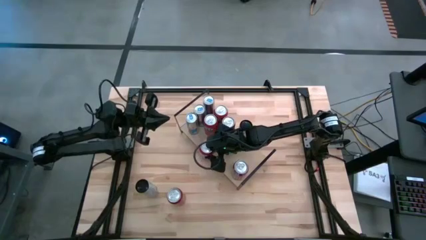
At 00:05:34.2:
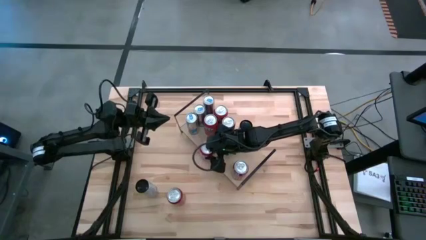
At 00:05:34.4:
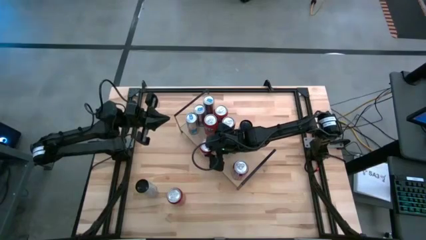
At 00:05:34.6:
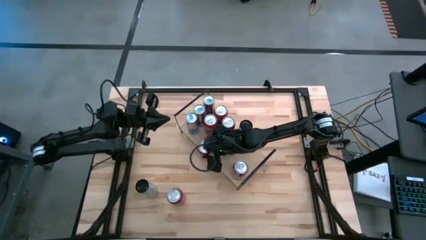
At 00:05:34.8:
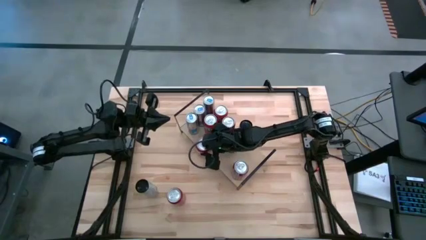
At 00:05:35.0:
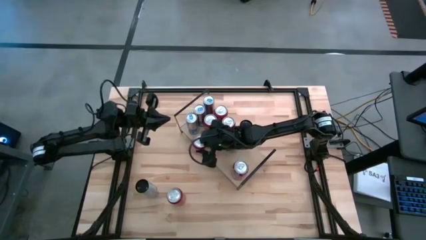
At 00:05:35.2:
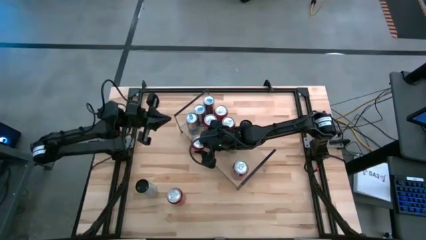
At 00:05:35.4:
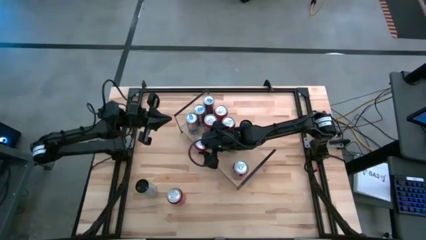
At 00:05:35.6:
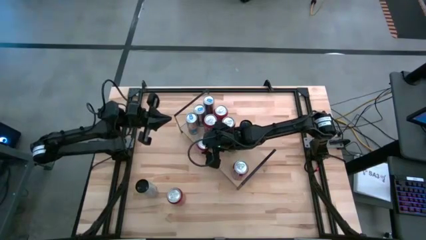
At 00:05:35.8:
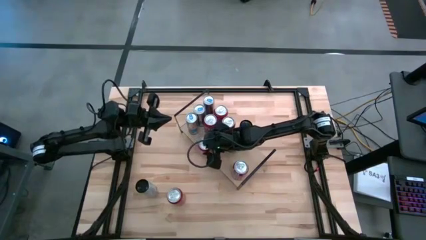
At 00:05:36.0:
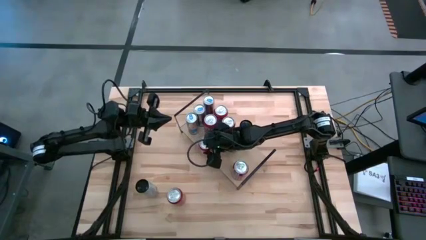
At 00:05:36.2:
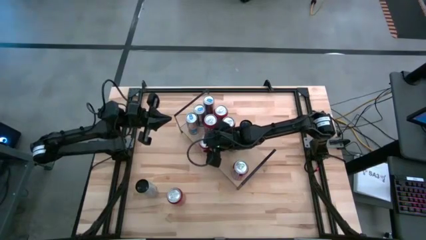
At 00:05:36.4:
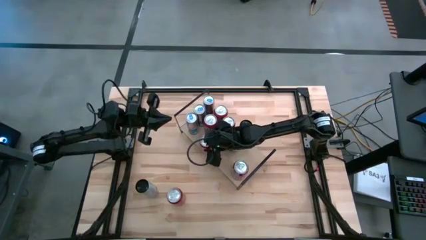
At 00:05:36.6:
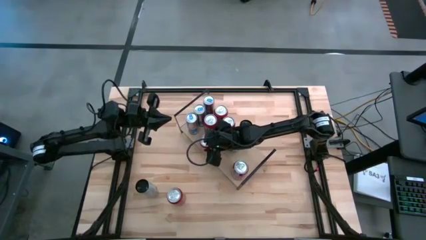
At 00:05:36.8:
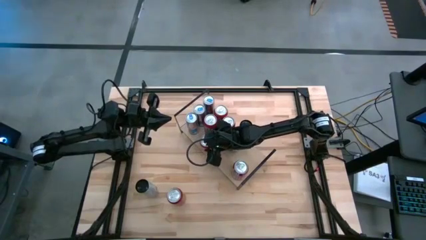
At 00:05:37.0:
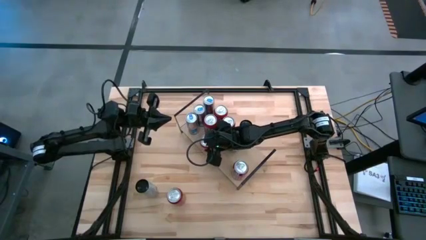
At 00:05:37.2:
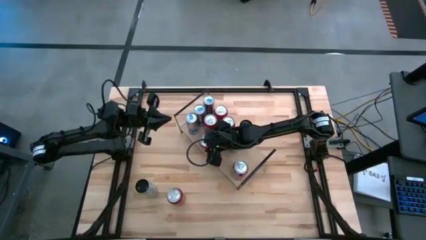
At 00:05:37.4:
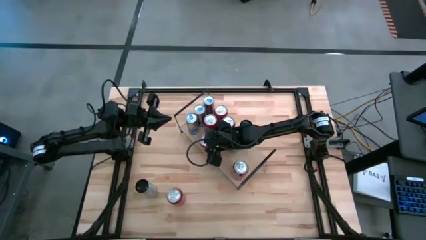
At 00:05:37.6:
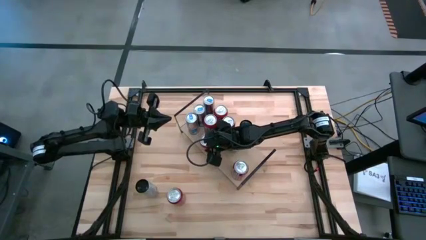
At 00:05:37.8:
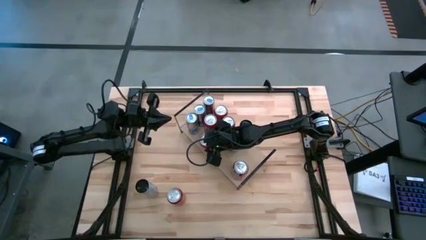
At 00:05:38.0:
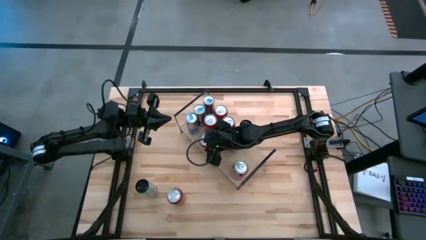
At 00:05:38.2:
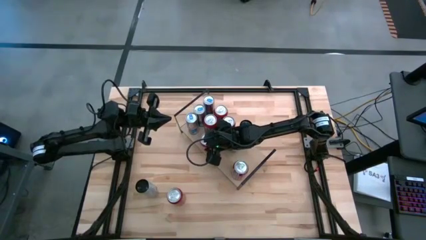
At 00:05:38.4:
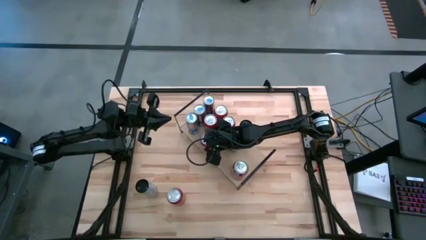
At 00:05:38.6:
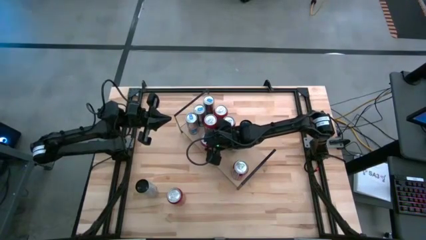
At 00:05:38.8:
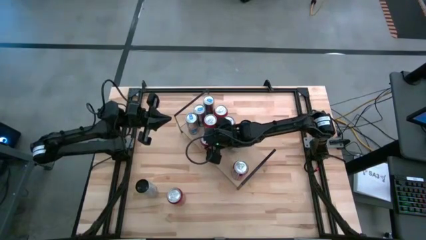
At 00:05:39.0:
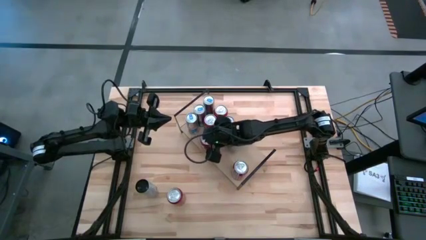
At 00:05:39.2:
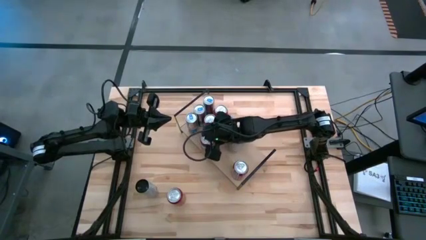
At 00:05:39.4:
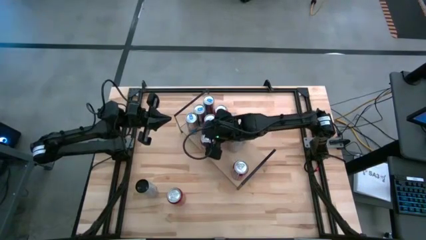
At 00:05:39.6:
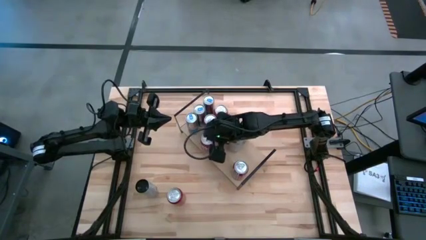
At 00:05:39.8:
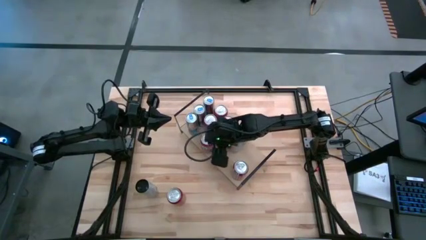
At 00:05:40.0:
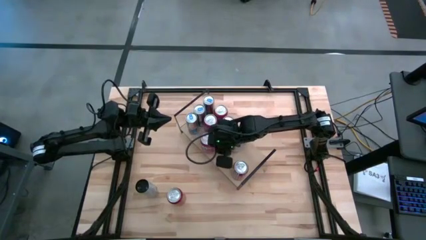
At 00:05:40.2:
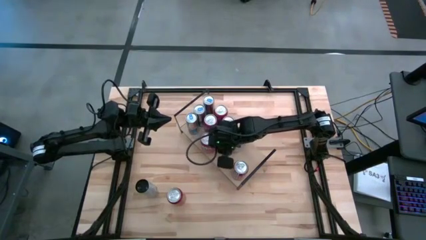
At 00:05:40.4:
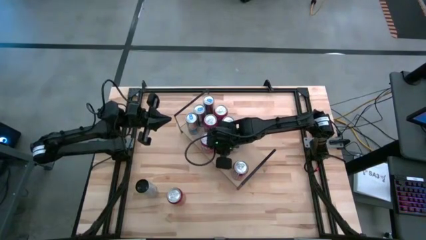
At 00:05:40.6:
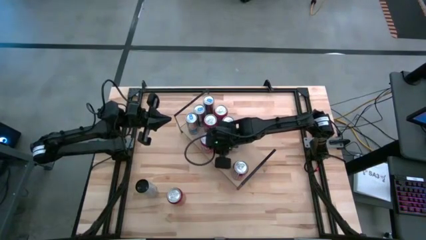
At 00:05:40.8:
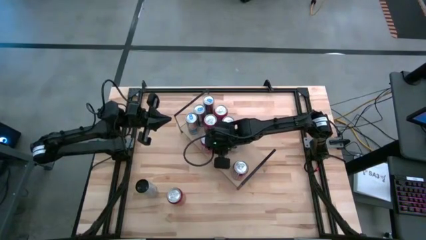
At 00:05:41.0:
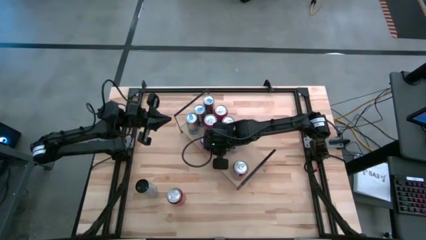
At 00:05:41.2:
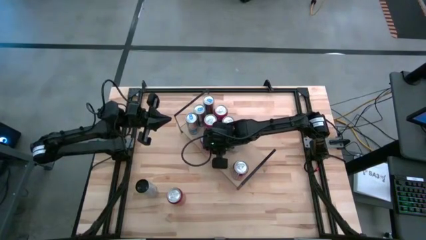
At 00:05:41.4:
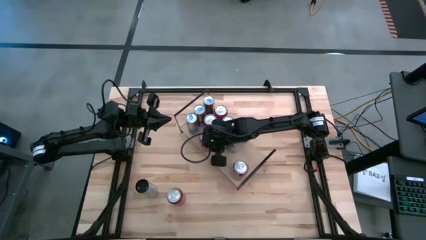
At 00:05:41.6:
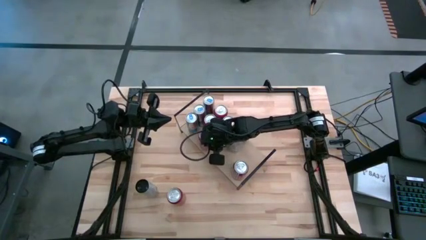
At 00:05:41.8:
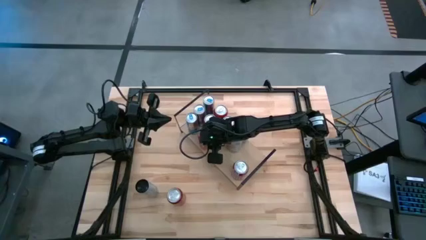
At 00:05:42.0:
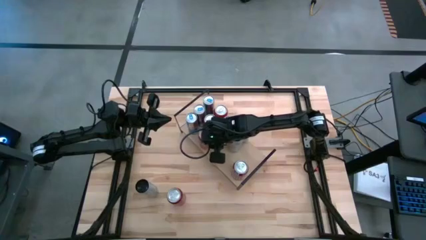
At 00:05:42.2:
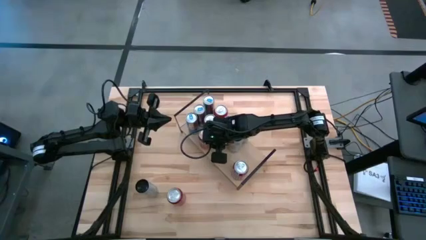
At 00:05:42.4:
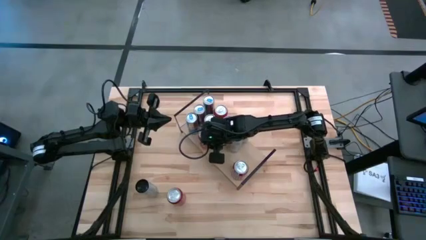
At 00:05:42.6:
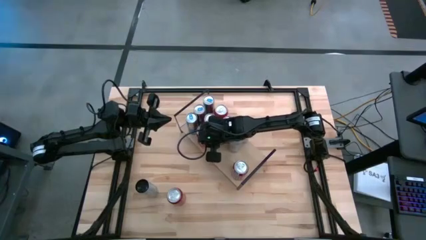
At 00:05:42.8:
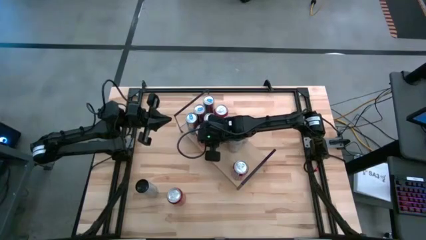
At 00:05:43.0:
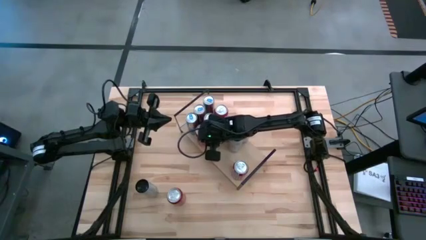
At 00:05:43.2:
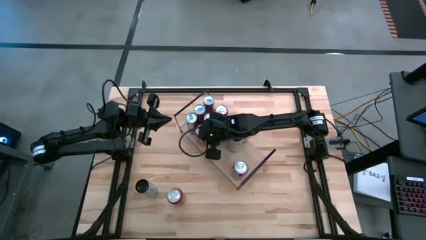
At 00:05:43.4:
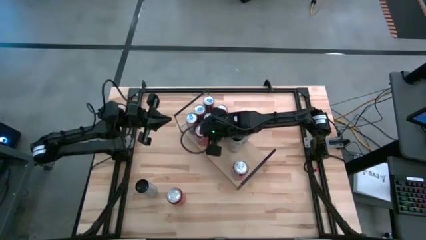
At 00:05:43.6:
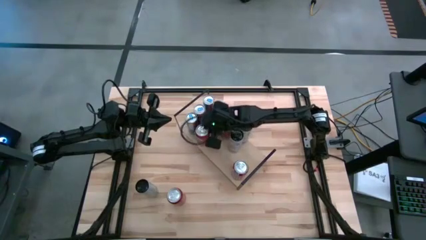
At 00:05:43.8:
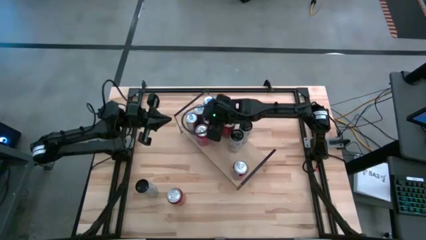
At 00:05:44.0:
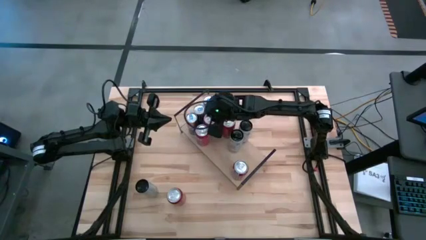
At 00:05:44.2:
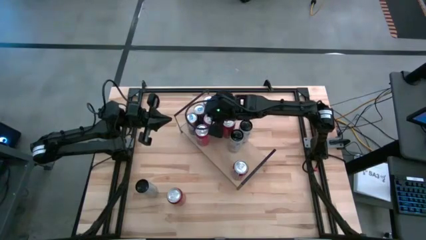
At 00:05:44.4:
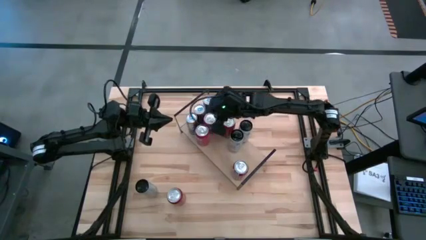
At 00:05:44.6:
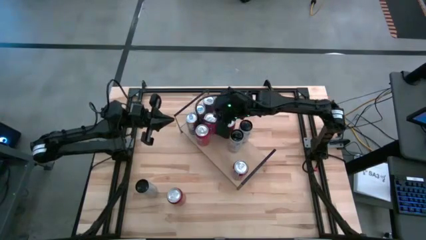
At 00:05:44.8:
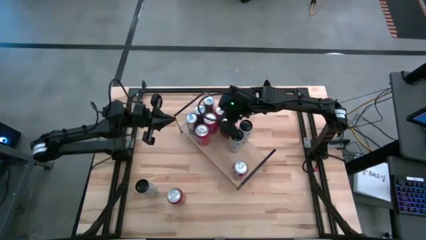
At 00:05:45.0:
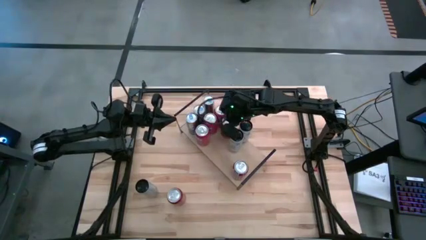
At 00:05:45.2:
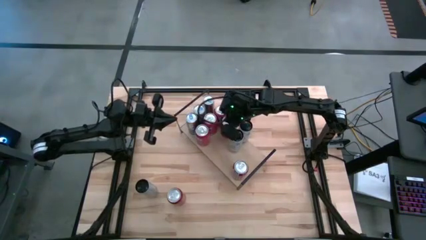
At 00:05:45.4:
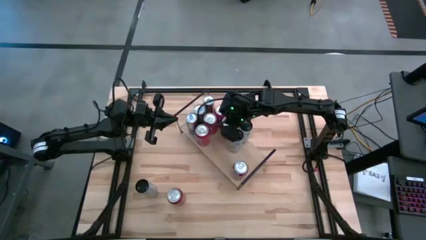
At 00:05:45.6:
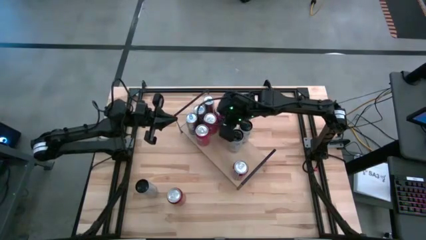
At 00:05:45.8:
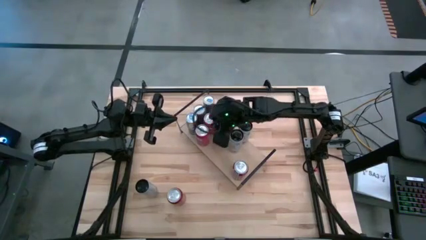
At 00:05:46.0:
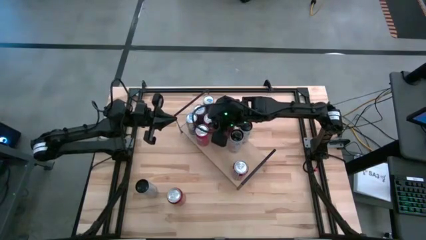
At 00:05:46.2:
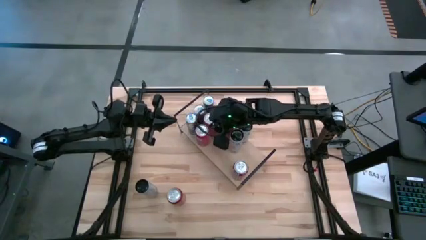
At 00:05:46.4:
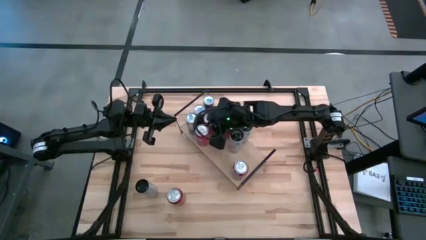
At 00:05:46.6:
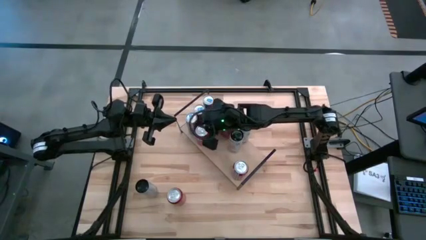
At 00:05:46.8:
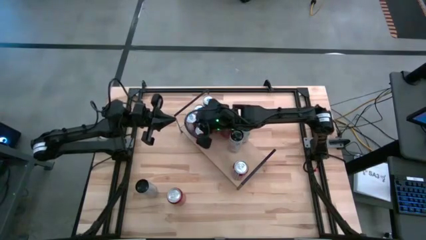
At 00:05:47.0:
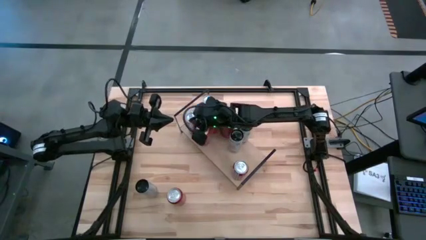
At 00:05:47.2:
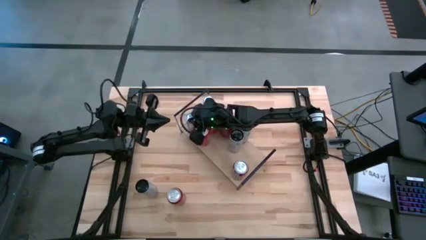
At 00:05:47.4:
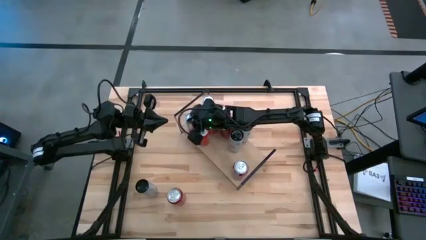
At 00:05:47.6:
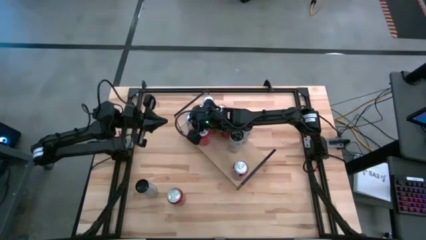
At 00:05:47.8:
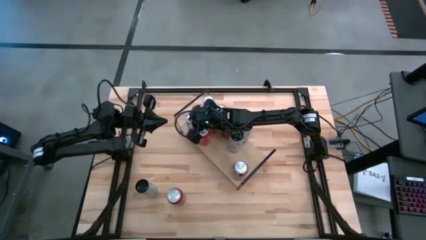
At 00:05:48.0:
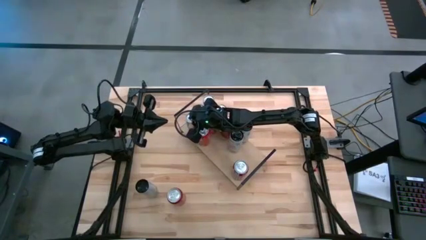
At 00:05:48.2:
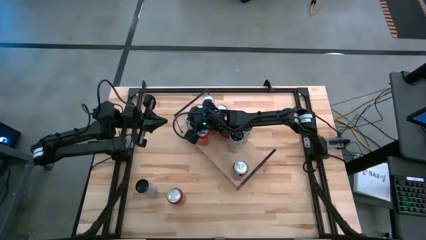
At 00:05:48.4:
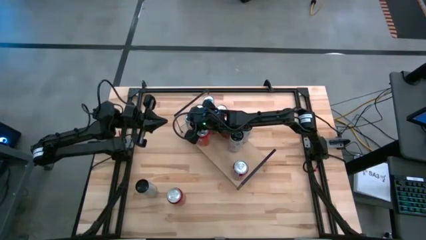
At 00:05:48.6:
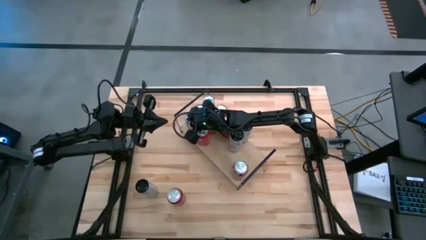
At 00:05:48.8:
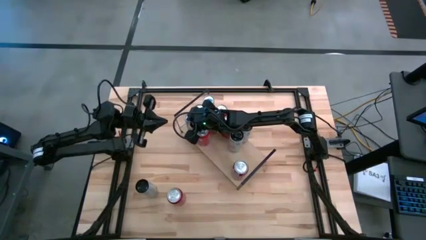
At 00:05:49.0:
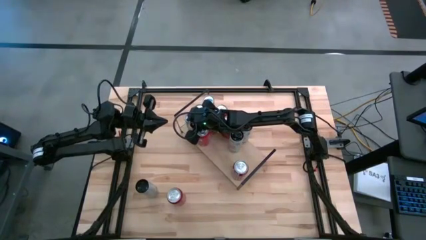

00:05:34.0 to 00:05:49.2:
Task: Place canned beverage on shelf
Put the orange soda can on the shelf aligned with the orange soda can on the shelf
